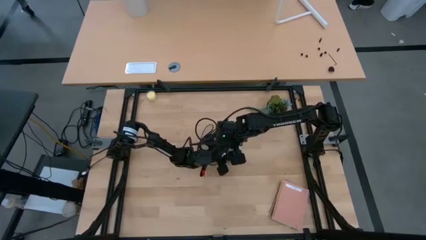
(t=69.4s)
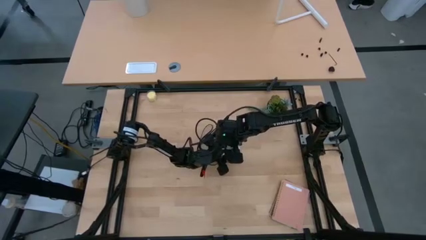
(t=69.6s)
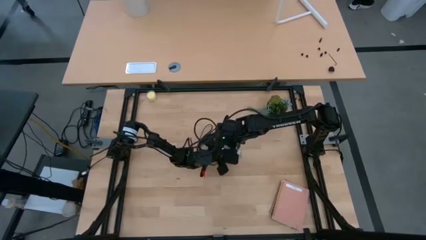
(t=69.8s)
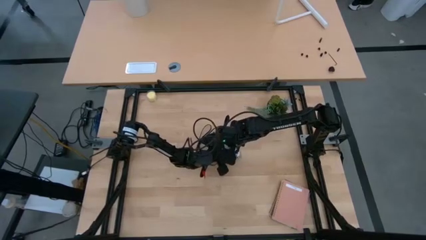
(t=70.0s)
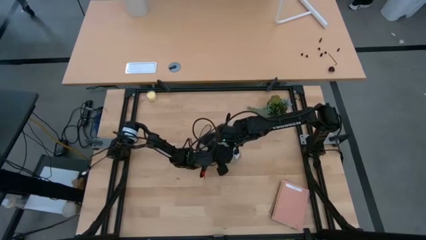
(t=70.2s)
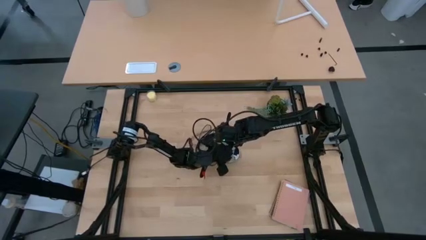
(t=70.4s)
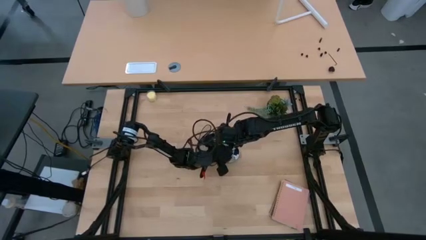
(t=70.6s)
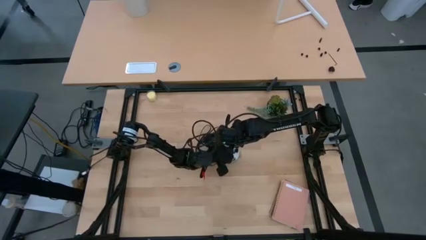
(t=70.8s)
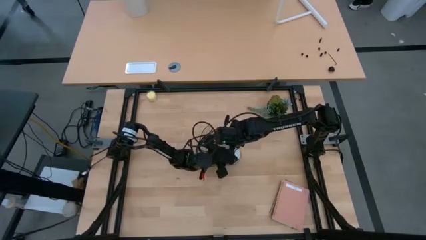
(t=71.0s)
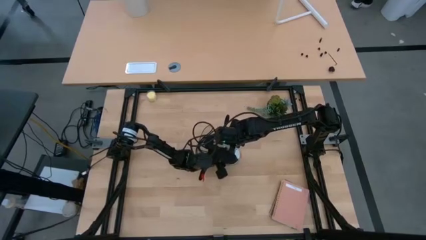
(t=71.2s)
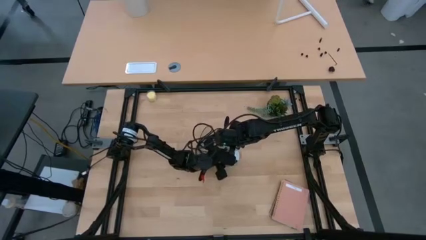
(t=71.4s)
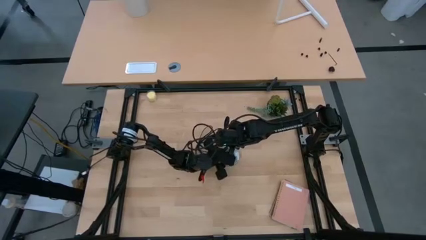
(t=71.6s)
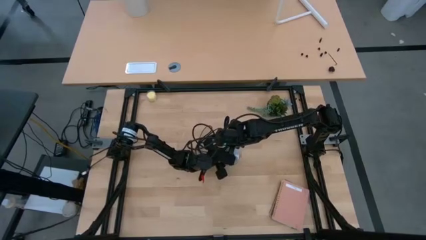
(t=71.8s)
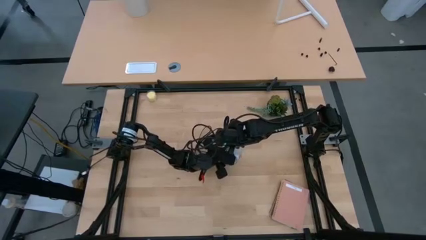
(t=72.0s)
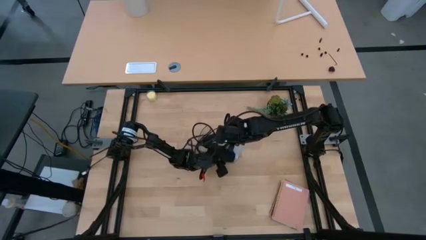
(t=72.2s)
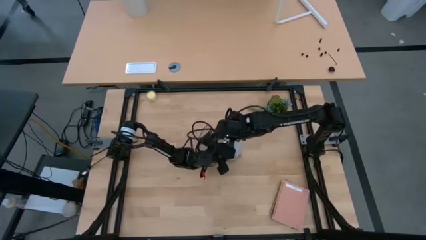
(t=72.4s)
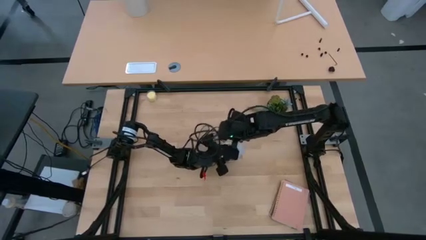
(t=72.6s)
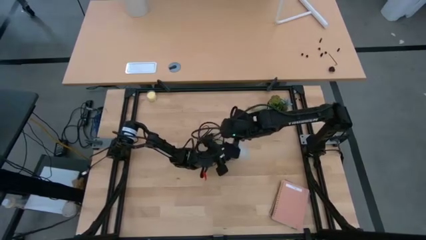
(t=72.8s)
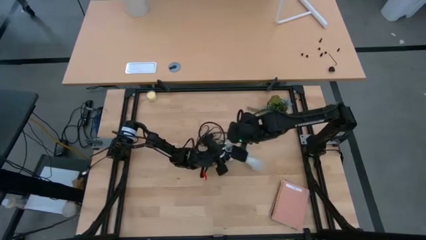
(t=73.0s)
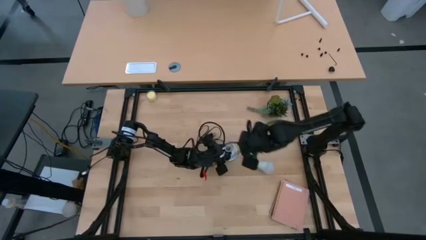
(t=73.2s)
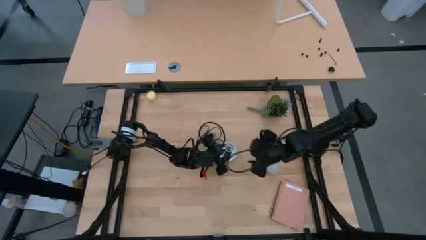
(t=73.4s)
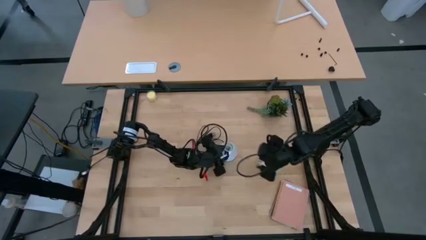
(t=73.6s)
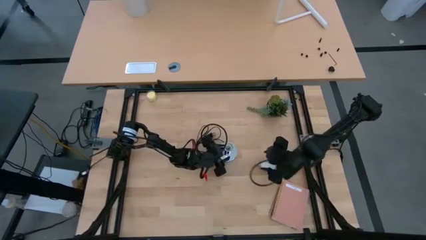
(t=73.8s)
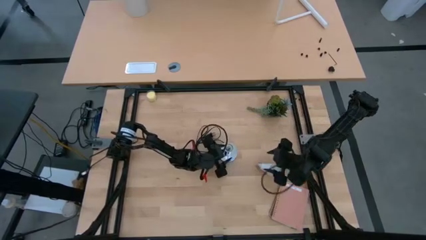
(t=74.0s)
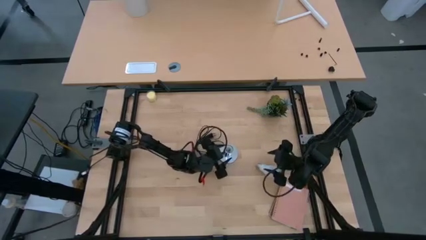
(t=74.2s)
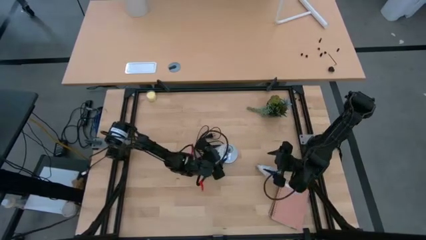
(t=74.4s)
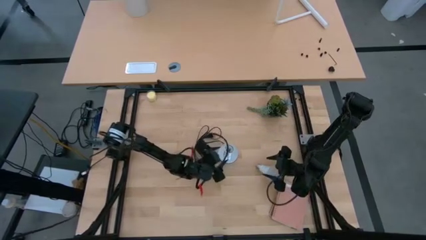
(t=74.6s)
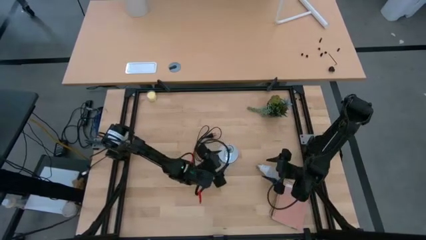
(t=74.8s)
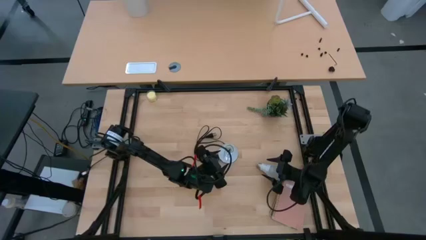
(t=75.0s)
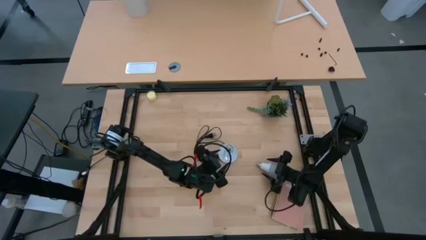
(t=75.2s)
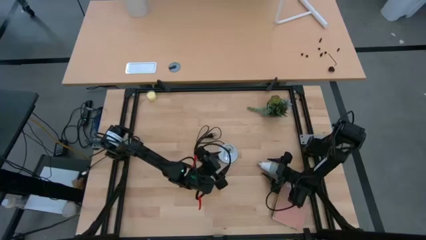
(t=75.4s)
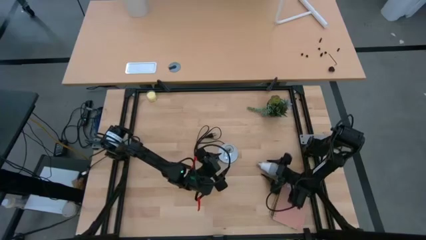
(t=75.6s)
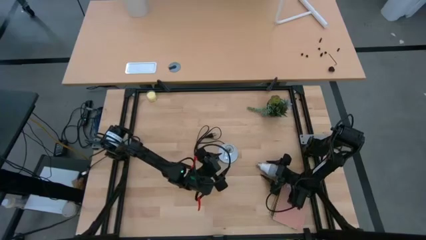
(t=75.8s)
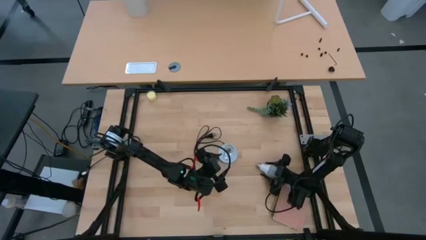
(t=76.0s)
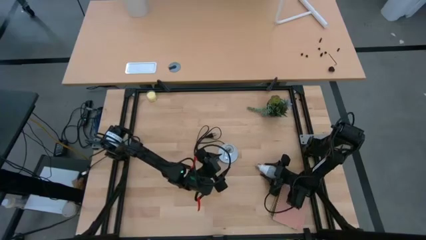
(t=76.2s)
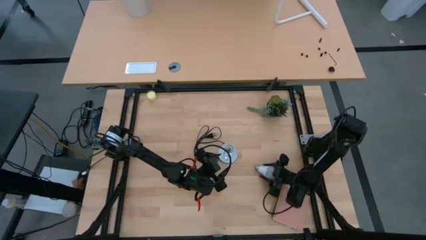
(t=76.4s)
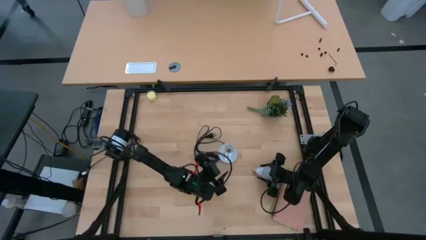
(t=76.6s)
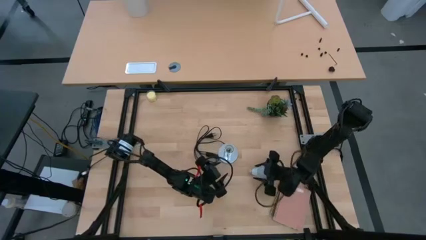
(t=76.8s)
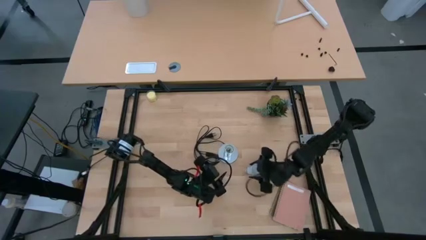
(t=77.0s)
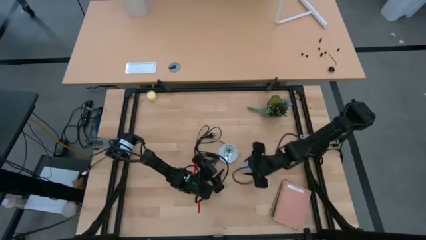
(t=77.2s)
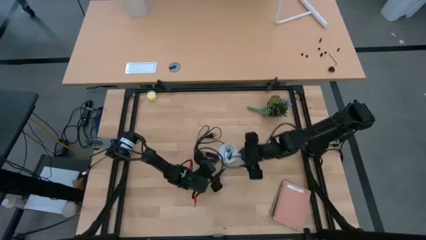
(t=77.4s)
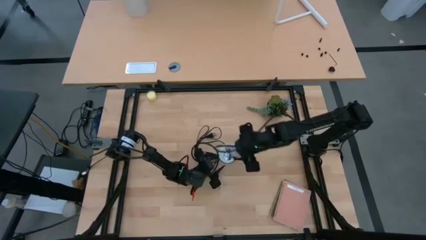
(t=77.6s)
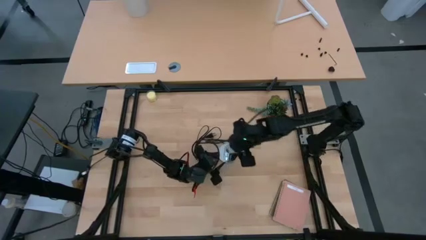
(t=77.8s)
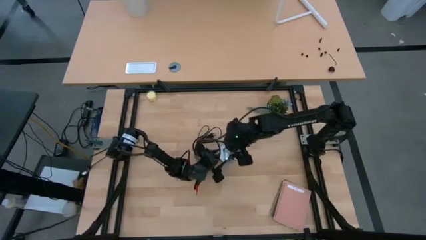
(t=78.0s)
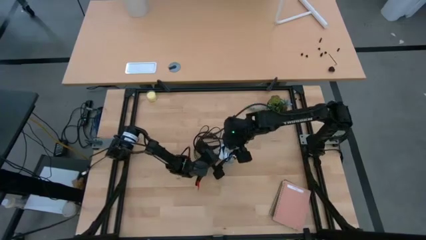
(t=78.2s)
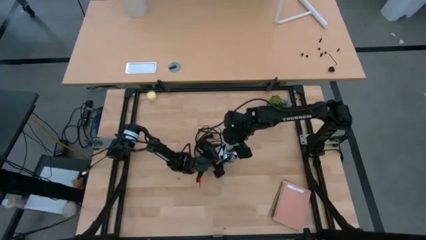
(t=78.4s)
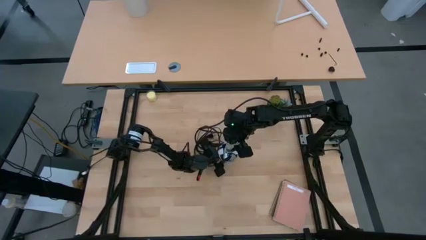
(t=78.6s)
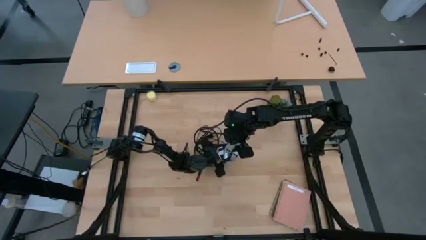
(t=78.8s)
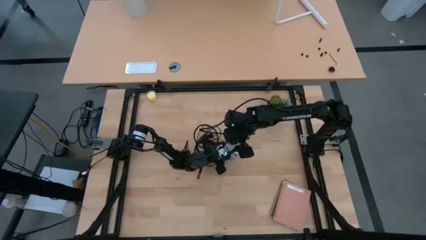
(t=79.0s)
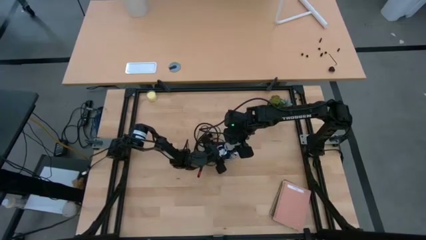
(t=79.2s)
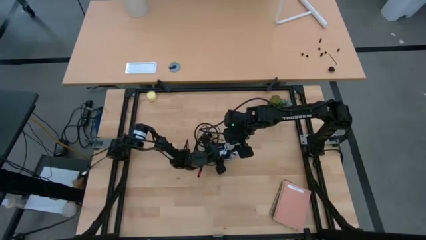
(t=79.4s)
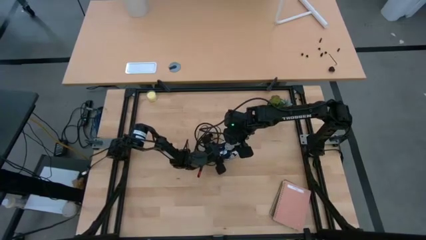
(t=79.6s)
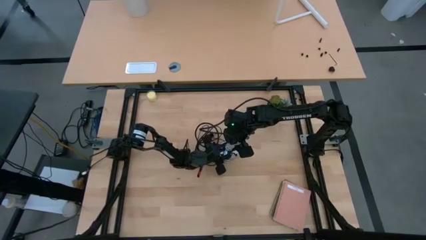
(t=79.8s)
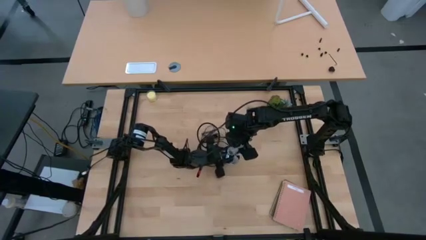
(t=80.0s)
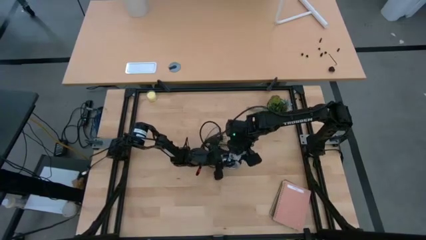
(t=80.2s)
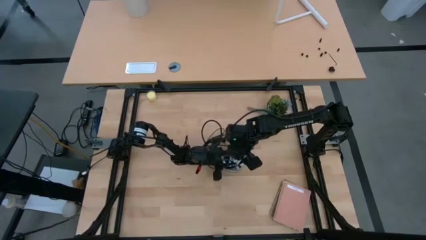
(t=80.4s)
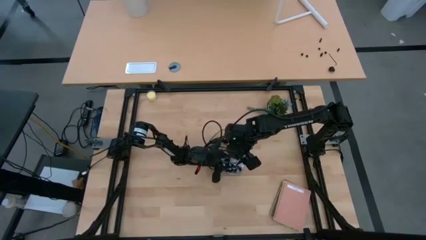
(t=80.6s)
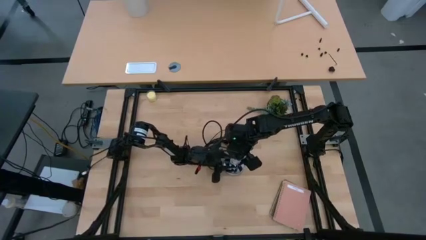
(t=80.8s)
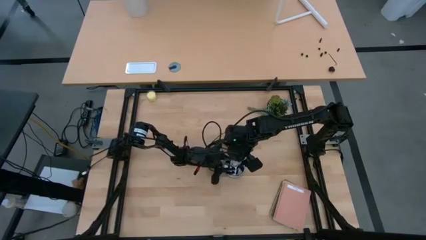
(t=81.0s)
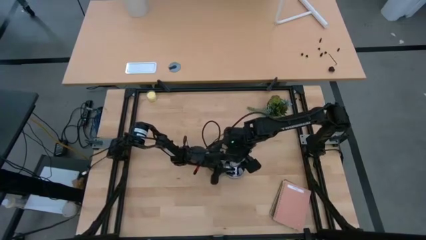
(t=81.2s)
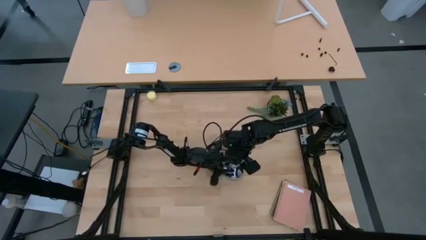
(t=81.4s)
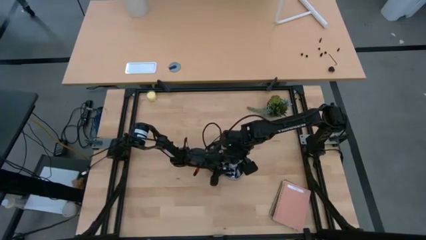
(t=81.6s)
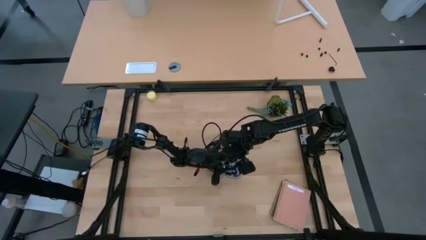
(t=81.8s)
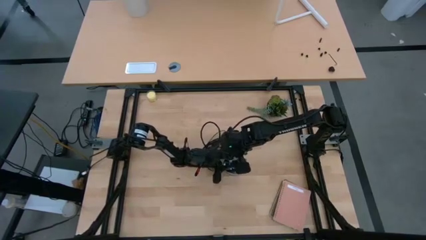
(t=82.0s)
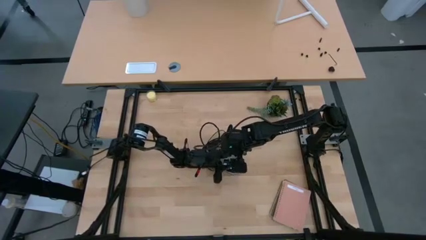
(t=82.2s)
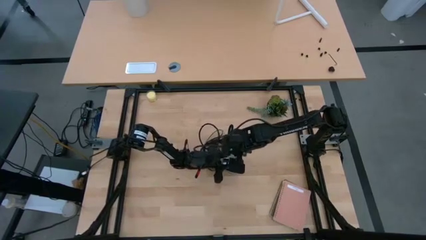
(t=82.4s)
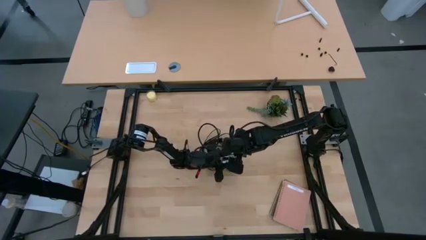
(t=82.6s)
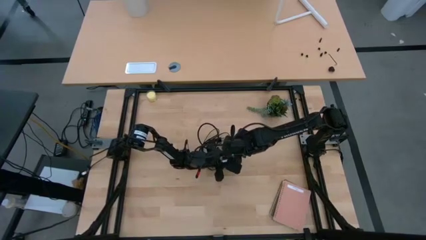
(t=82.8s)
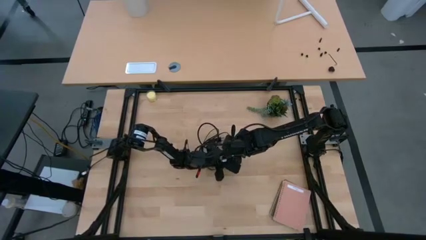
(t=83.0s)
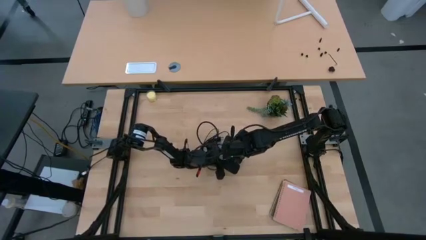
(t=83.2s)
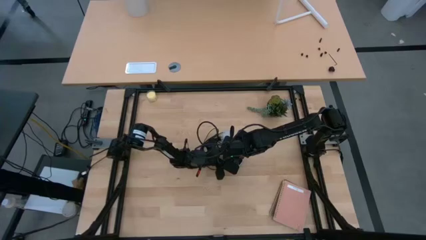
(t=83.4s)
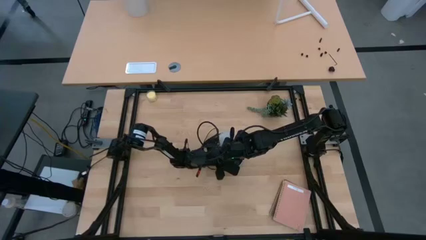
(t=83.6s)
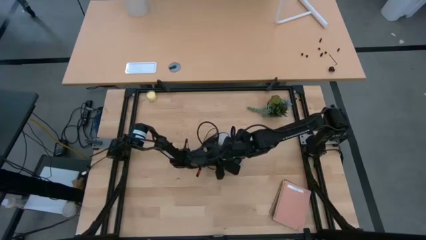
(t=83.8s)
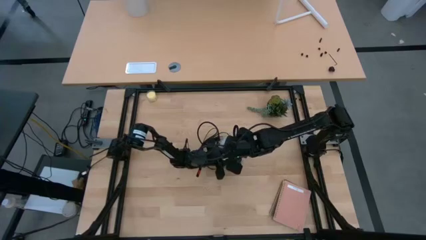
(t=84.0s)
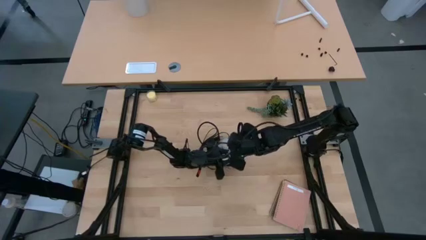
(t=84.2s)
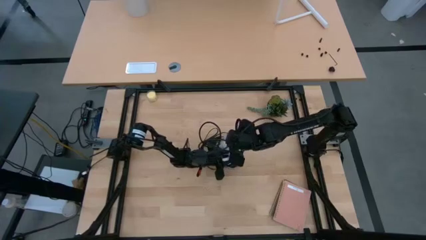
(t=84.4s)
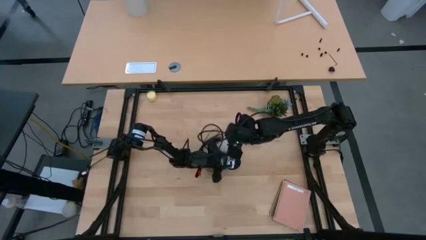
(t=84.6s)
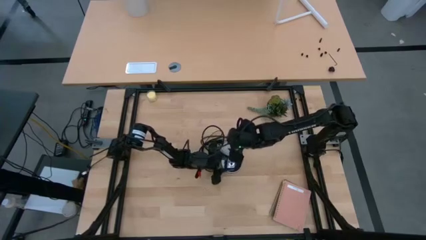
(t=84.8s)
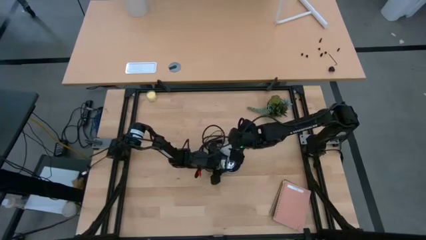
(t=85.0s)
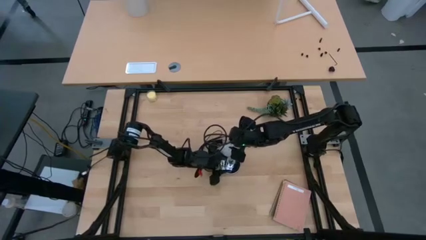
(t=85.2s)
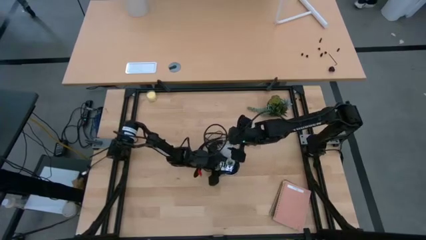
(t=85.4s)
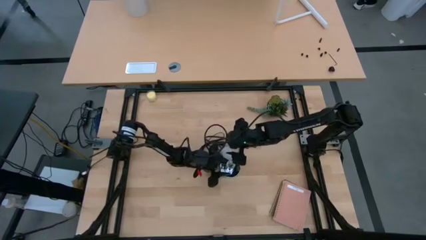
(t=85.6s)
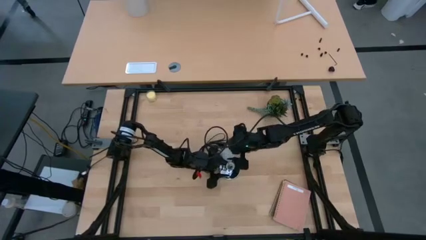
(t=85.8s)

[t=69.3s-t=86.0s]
Task: Screw lightbulb
Insert the white lightbulb into the metallic lamp
